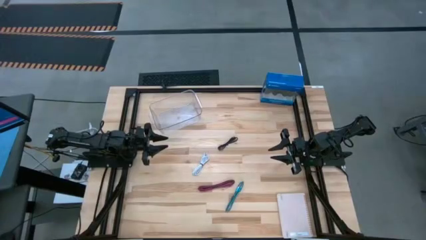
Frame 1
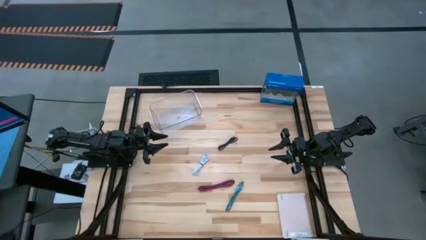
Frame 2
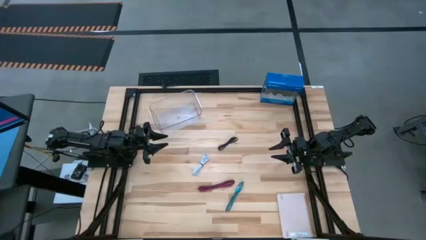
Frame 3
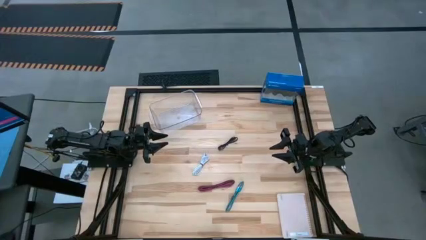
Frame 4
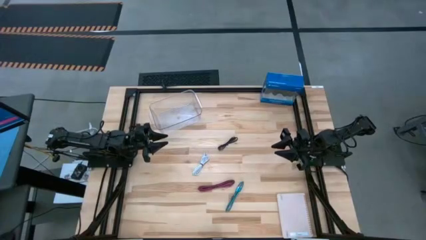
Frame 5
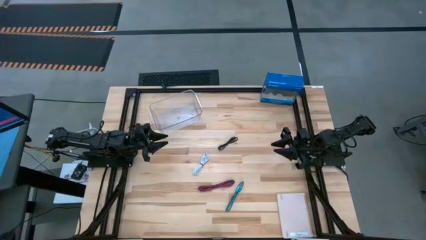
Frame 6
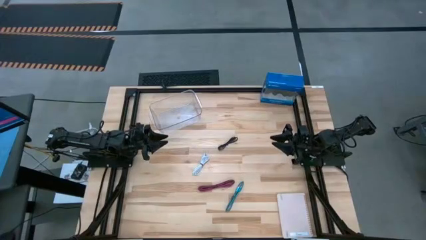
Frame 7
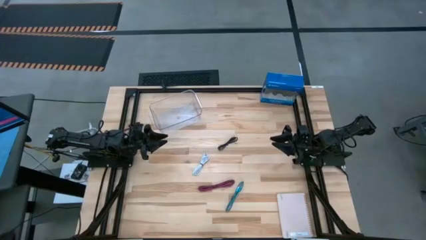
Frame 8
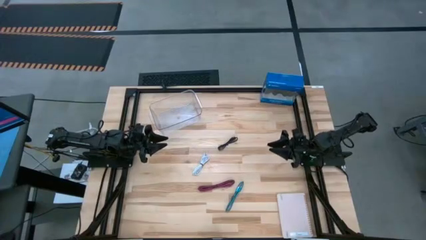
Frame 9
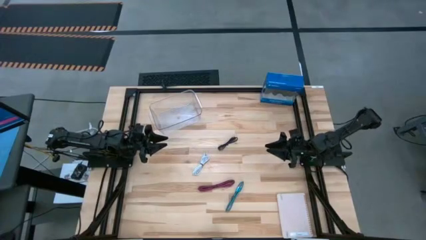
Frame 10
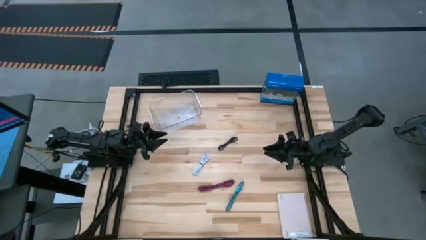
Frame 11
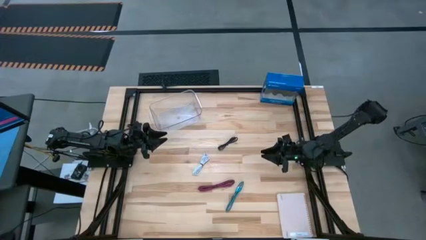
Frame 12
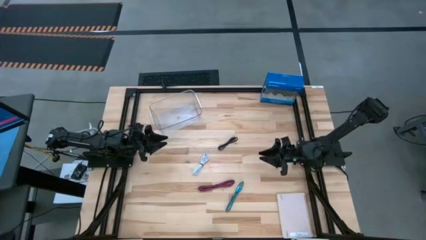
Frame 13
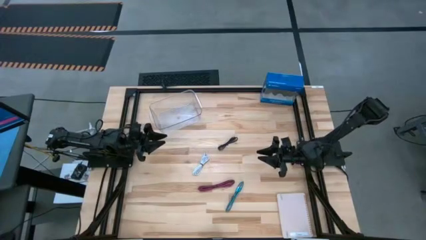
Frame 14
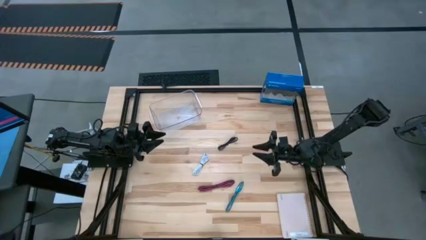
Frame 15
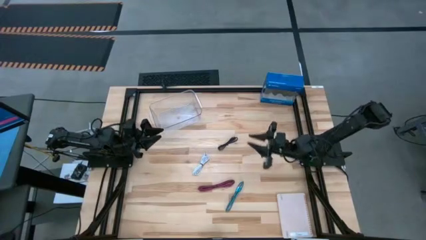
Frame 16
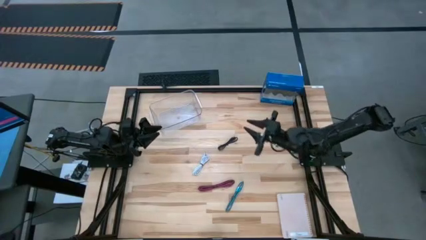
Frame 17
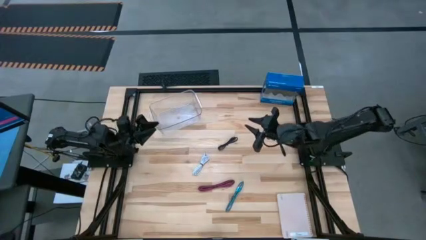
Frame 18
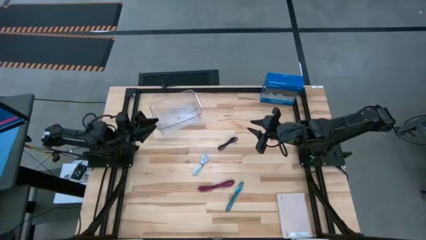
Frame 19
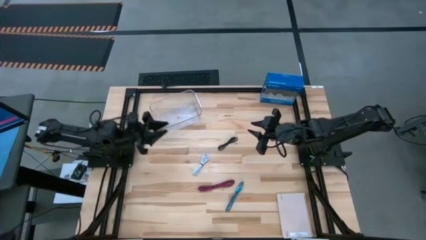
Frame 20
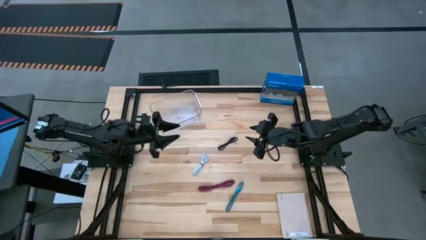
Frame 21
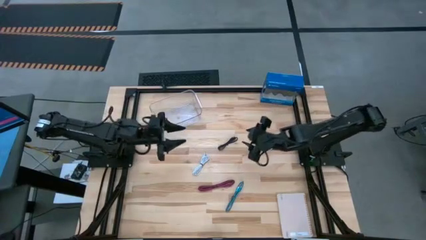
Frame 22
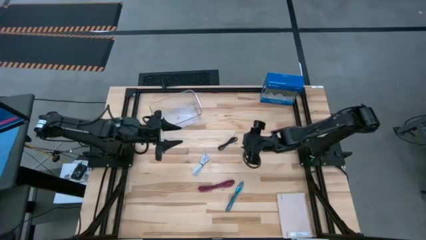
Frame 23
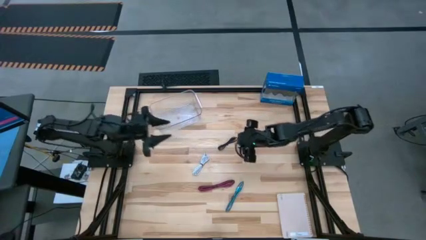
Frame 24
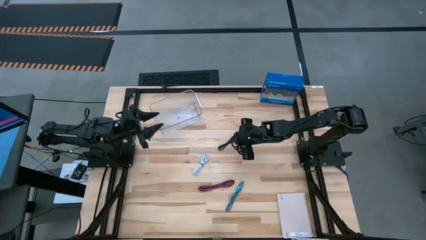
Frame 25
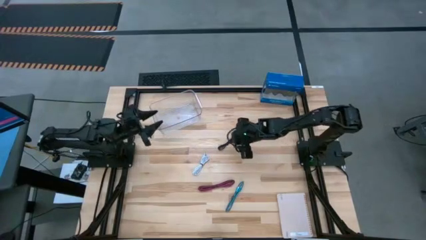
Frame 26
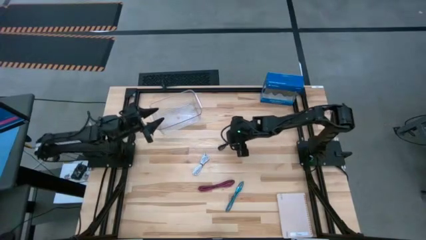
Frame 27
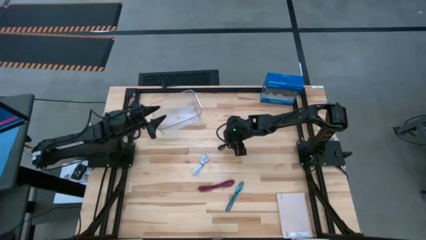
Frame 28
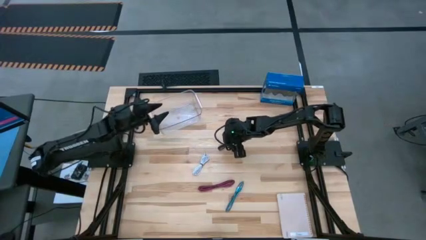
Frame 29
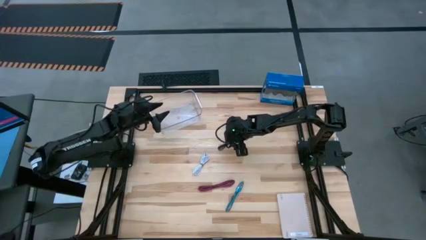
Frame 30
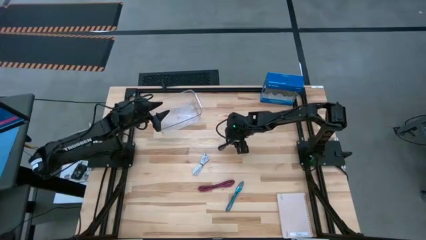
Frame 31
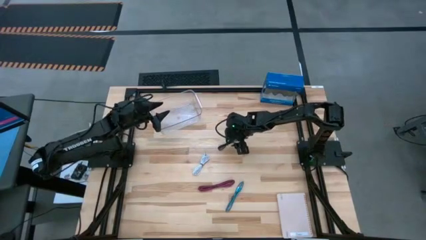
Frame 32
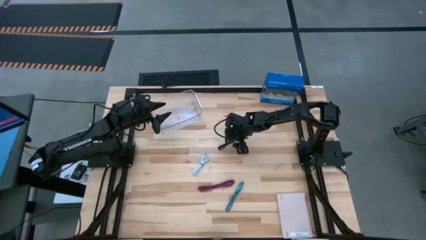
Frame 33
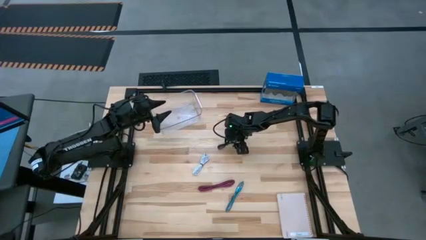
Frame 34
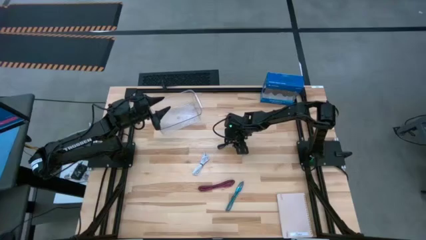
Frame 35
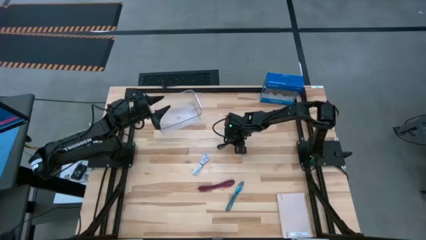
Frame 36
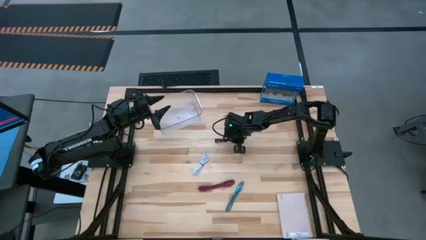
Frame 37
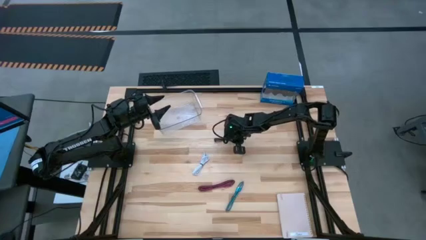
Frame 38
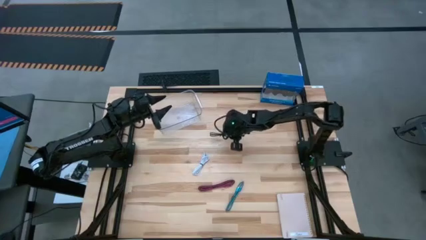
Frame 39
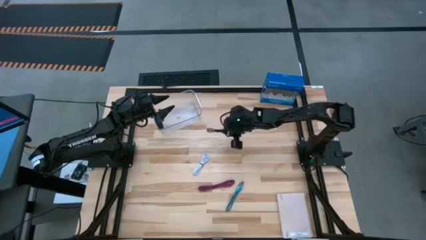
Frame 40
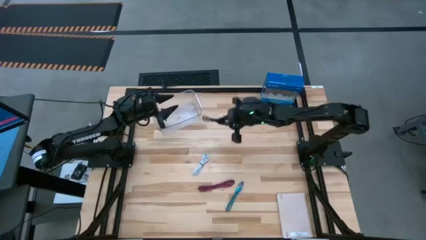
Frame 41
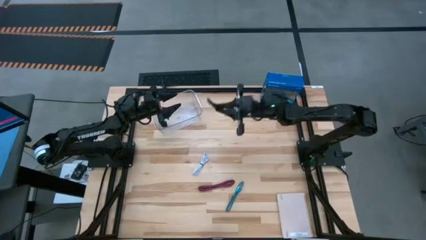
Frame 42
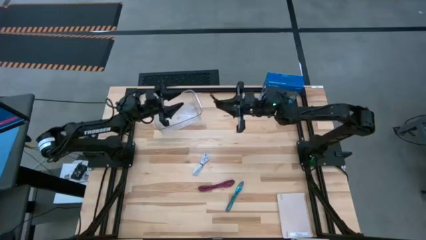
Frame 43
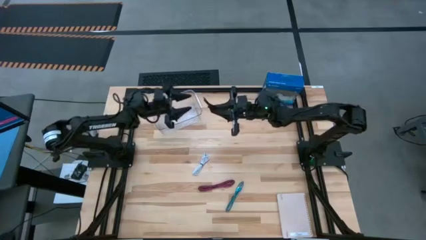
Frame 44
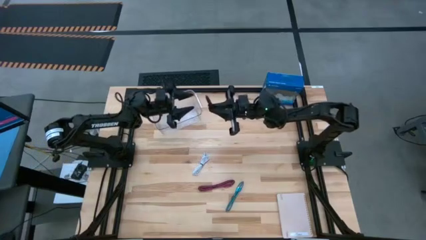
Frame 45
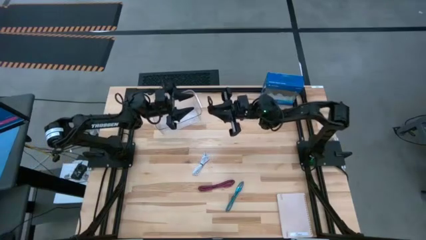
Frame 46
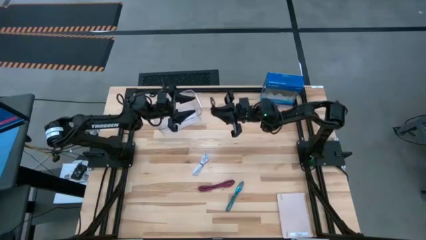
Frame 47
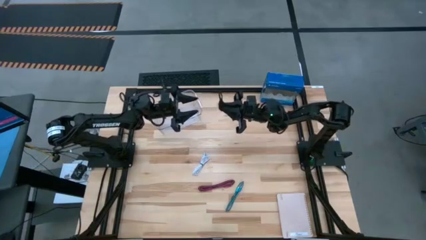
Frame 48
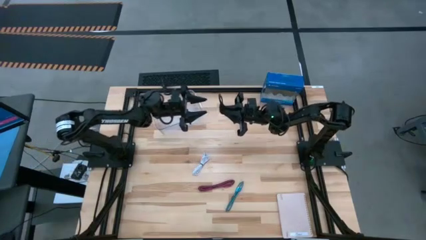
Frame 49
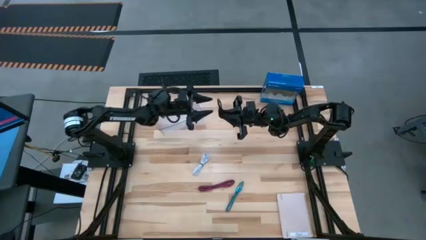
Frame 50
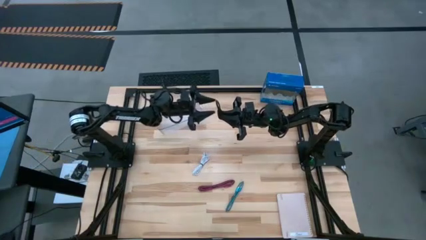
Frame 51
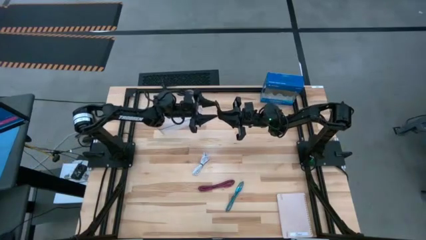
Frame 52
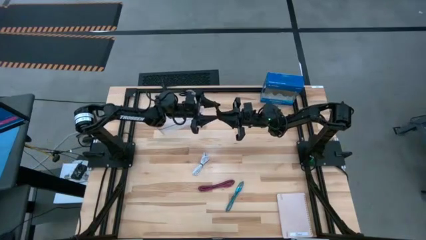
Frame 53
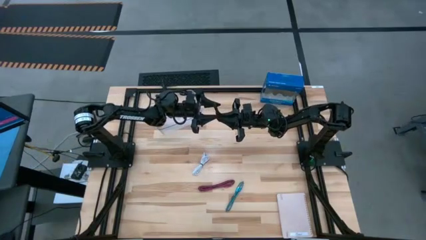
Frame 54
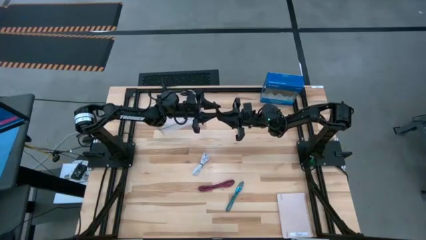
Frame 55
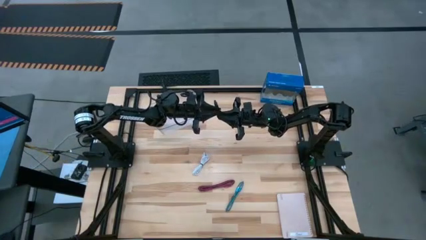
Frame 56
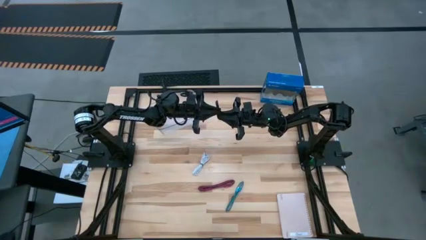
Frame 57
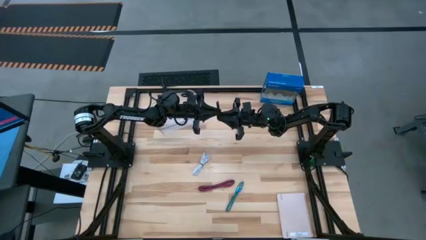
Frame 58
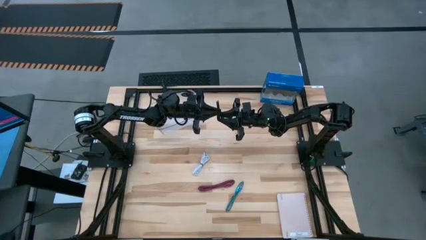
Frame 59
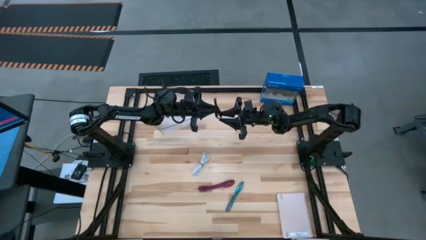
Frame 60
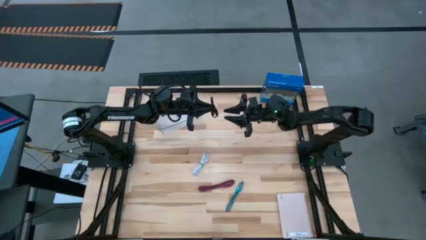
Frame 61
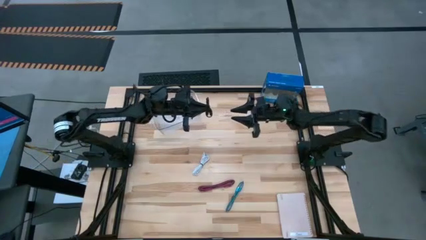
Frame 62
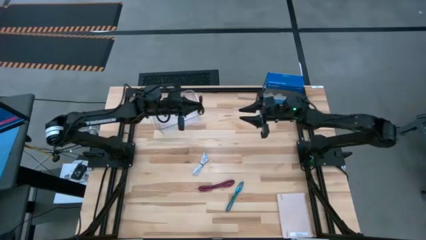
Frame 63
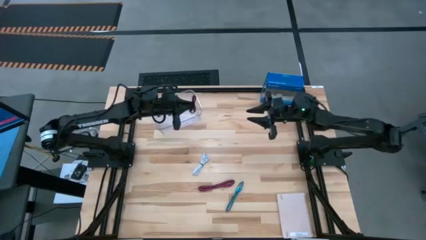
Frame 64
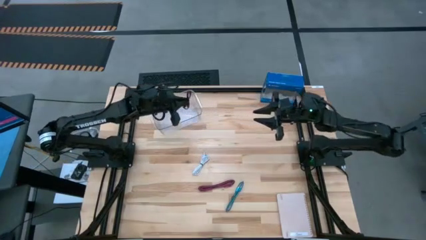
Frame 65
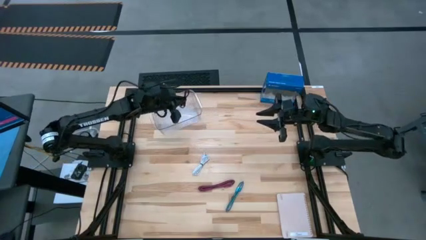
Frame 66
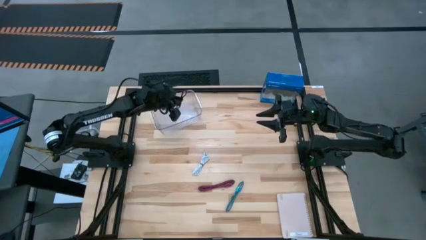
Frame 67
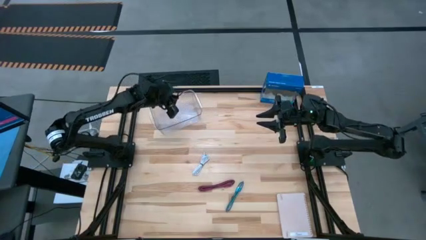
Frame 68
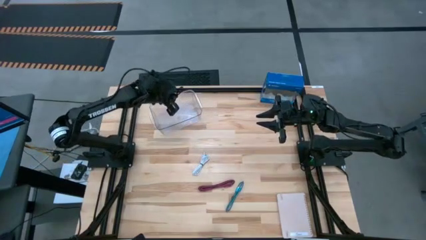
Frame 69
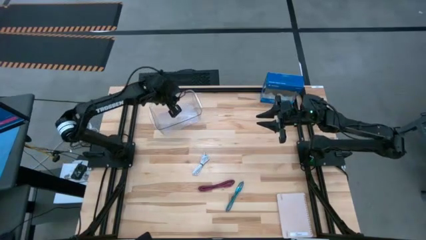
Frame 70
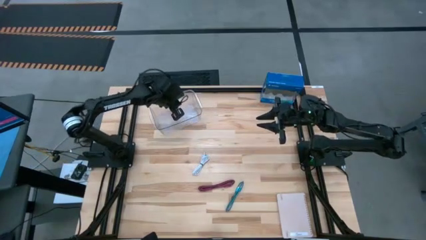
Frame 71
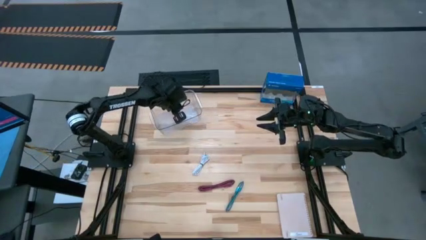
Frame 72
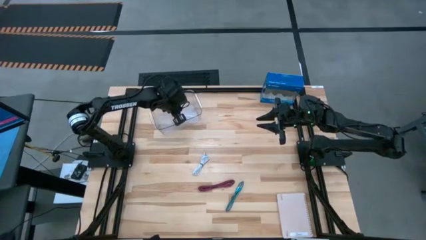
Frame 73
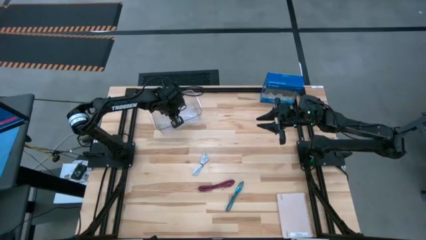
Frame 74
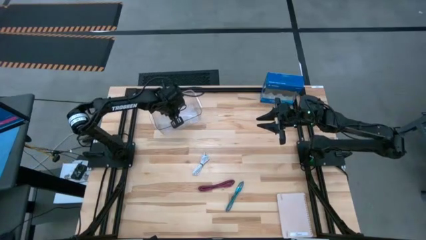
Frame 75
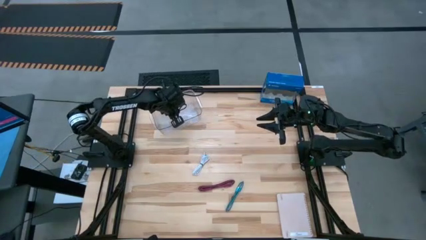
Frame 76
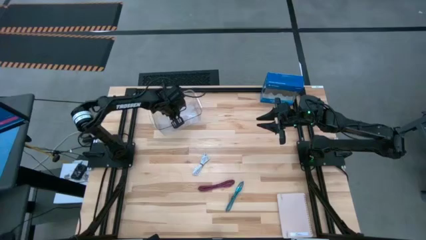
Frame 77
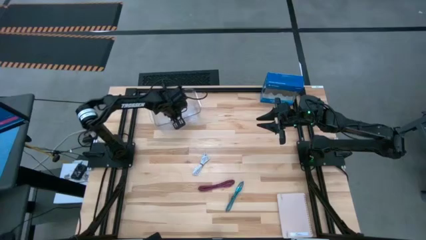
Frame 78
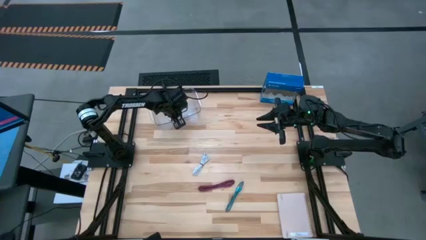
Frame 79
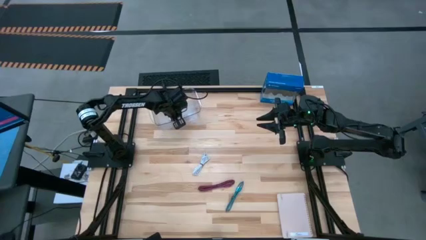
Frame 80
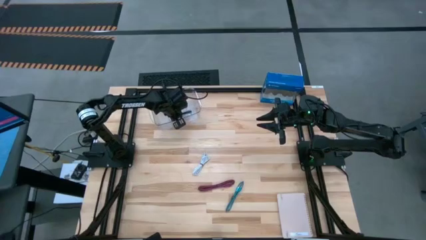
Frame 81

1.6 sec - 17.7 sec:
Task: Pick and place USB-C Cables
Put the black charger cable into the transparent bin
